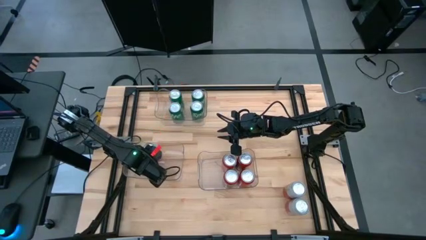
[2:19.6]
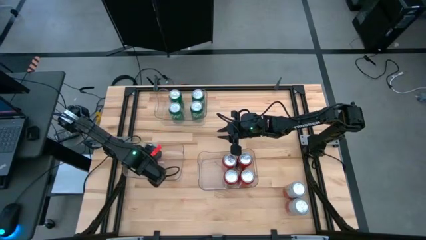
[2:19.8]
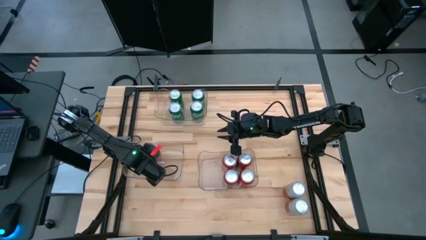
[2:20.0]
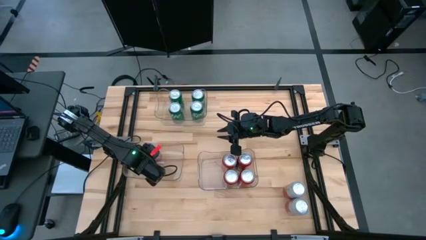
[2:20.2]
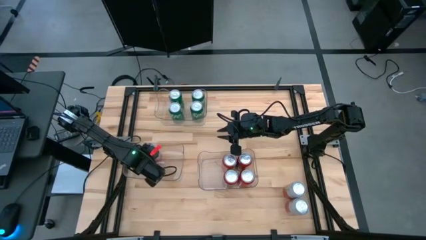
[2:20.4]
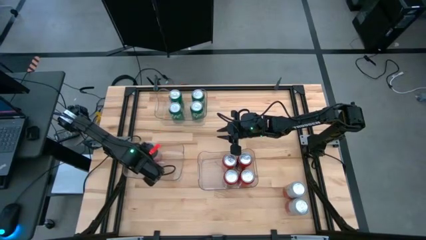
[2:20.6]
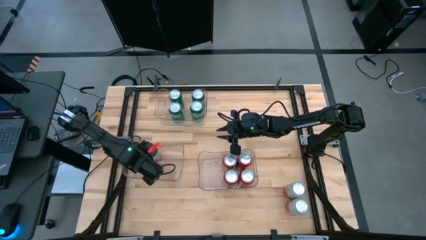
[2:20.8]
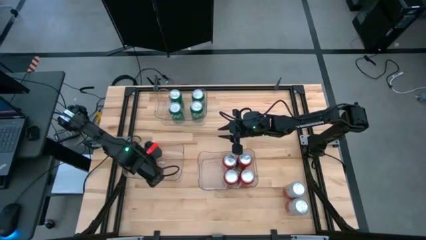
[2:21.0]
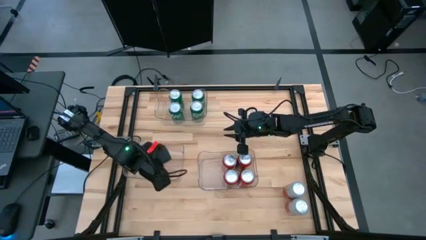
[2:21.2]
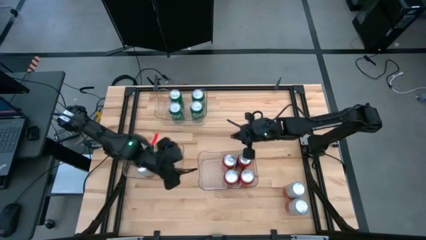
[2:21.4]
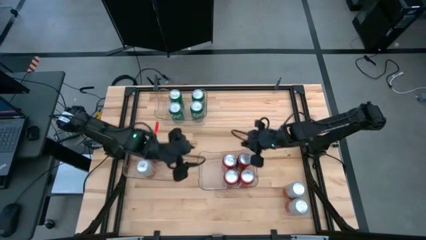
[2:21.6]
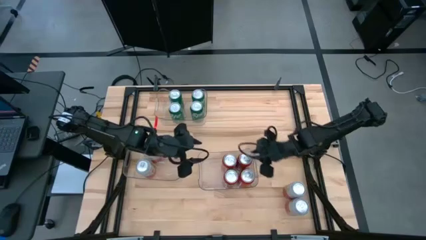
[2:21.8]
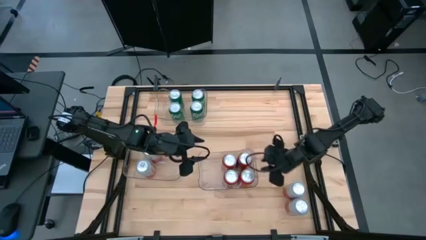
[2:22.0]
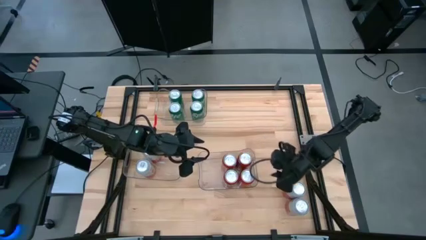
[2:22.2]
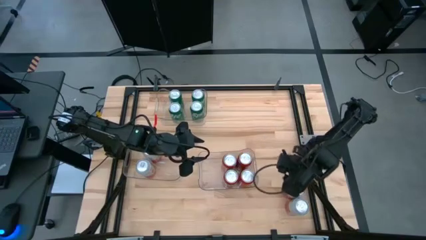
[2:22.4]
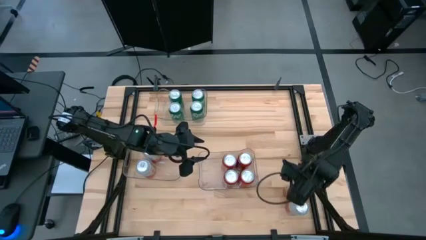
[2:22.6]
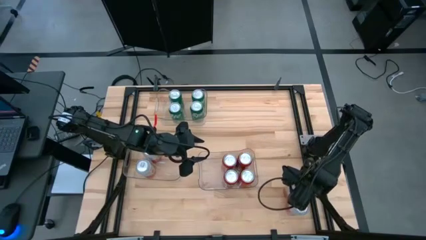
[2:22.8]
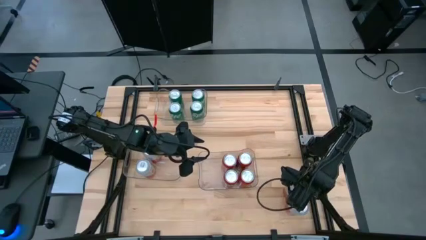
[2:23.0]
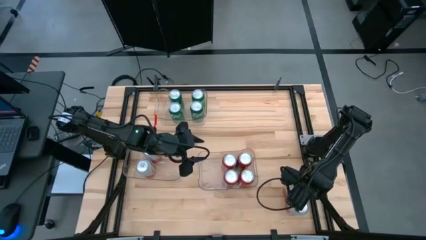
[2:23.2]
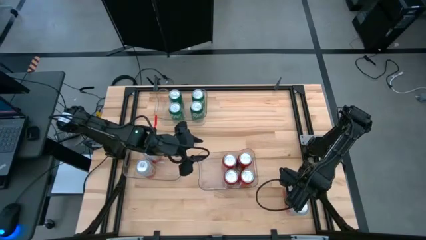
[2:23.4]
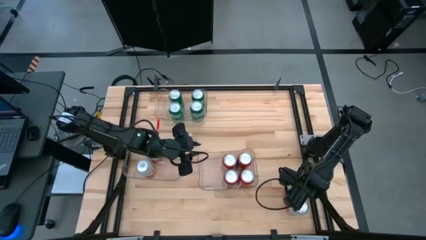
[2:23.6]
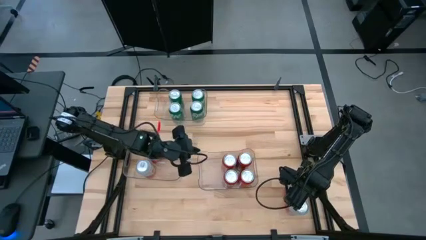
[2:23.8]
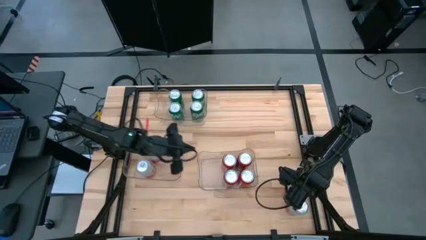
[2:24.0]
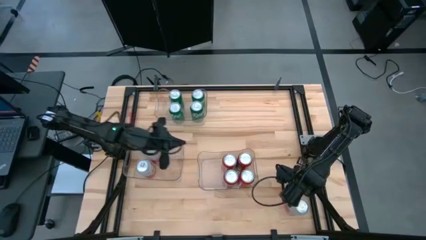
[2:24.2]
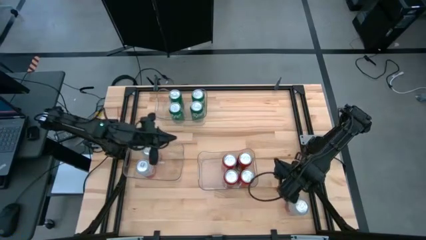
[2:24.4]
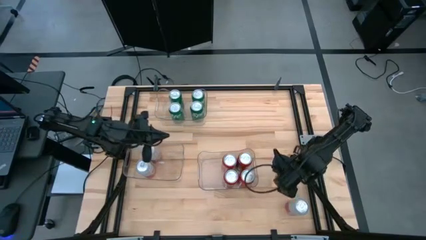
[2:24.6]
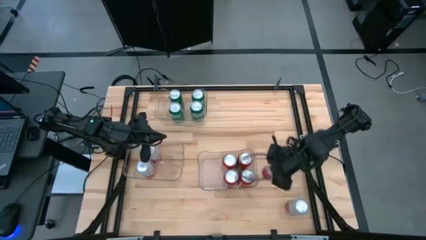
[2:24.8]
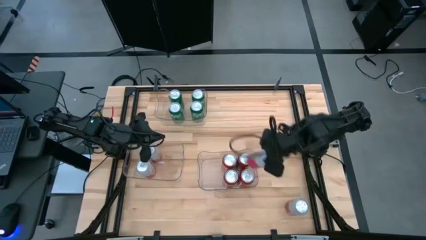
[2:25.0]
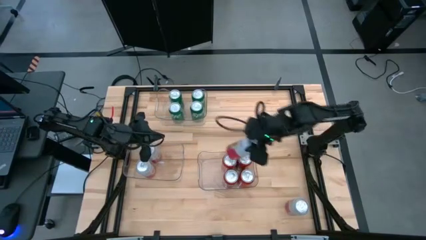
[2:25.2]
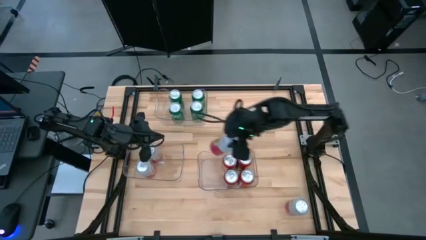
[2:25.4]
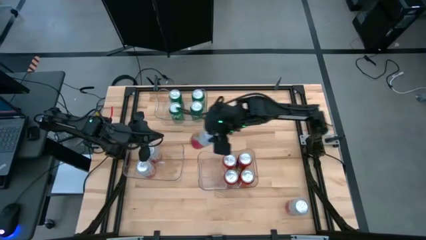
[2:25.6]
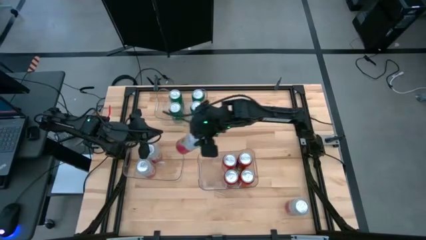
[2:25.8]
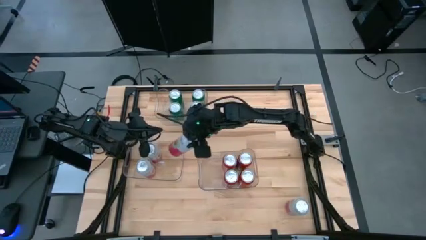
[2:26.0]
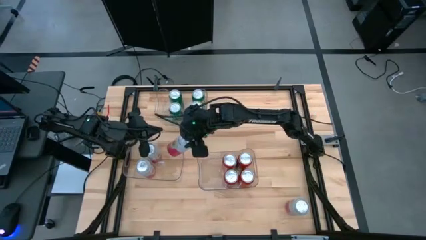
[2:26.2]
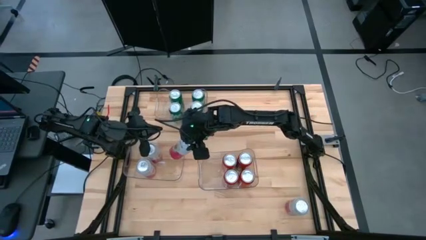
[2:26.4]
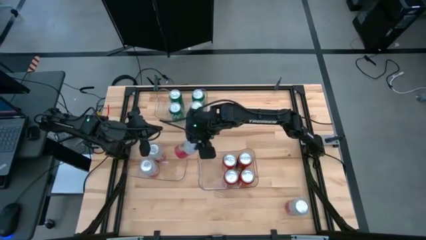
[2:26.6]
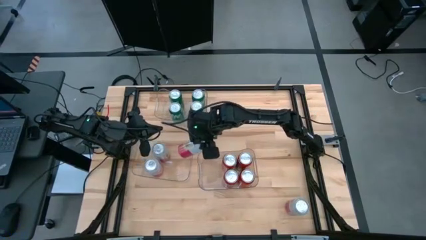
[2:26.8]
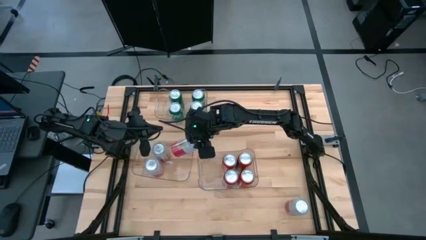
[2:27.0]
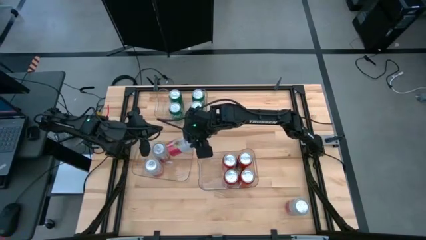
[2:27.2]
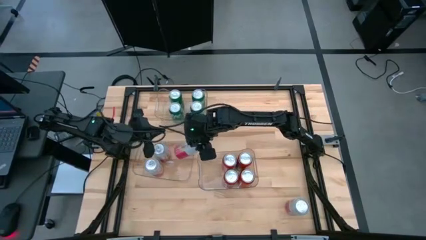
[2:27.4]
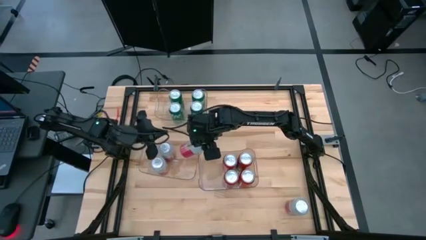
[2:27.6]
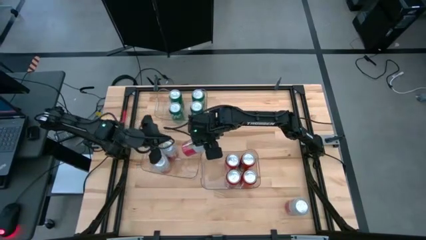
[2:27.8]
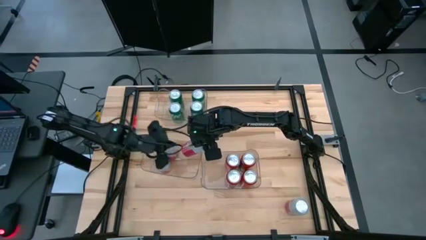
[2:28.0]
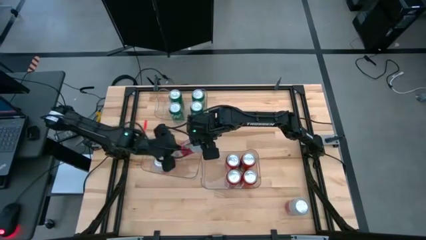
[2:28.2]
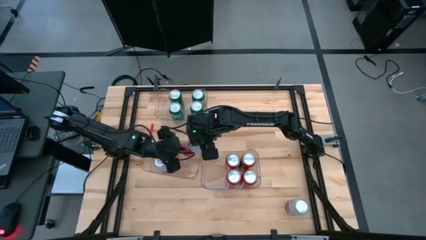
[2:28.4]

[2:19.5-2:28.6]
Task: Sort soda cans
Put the pink white soda can into the bottom left transparent bin

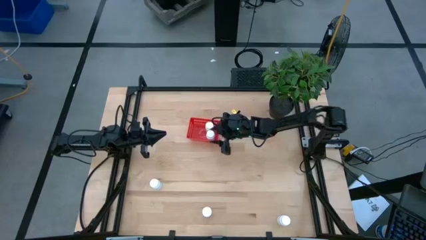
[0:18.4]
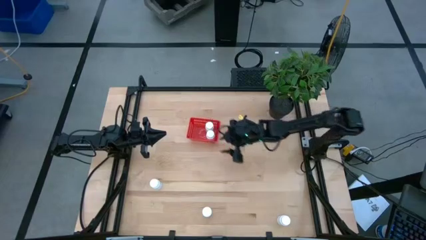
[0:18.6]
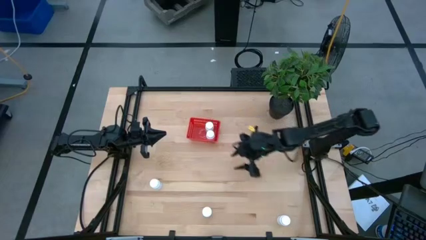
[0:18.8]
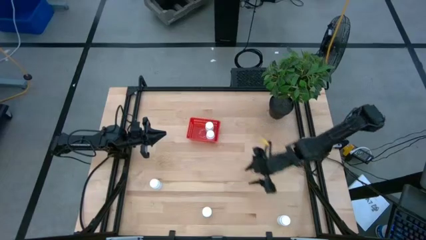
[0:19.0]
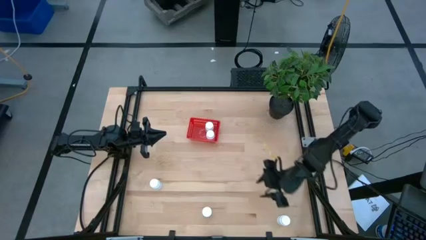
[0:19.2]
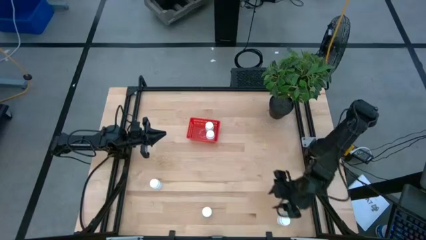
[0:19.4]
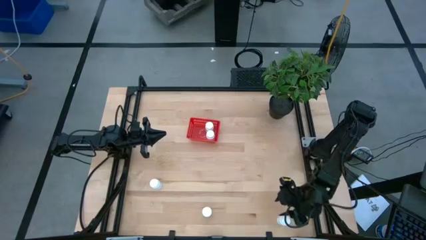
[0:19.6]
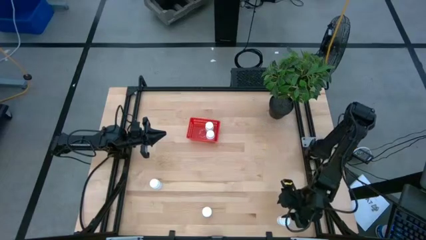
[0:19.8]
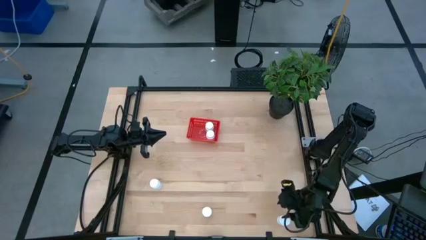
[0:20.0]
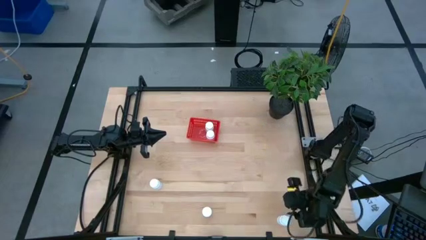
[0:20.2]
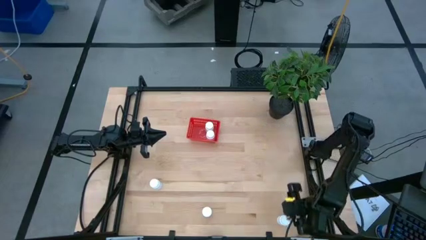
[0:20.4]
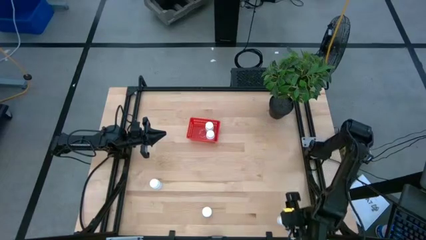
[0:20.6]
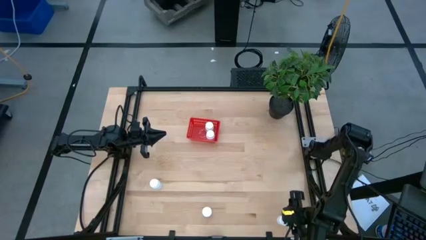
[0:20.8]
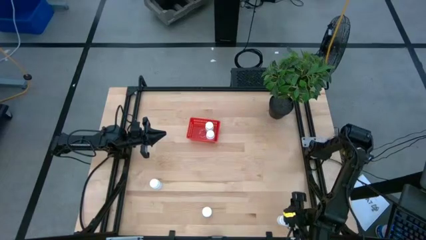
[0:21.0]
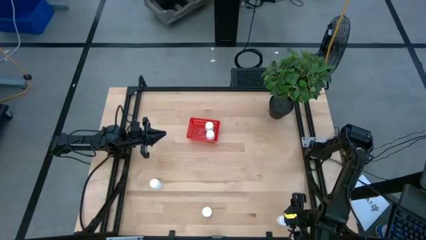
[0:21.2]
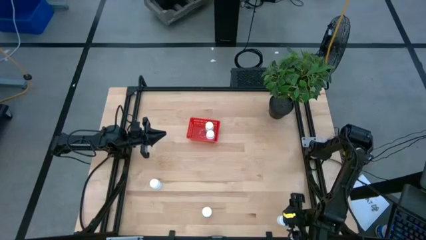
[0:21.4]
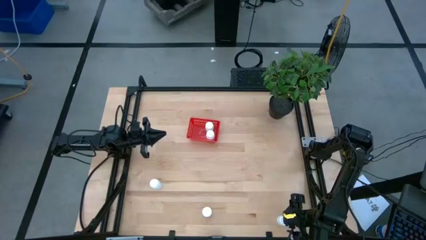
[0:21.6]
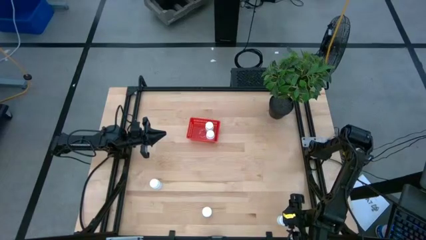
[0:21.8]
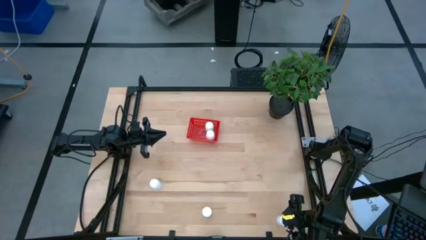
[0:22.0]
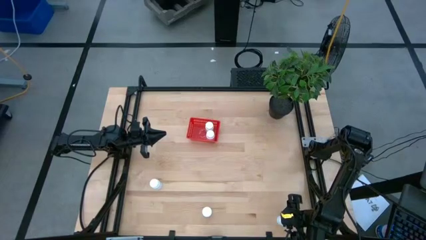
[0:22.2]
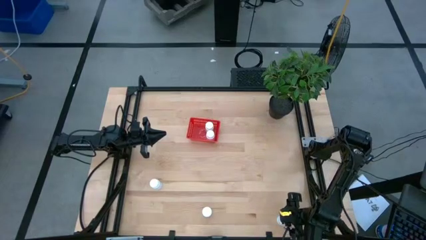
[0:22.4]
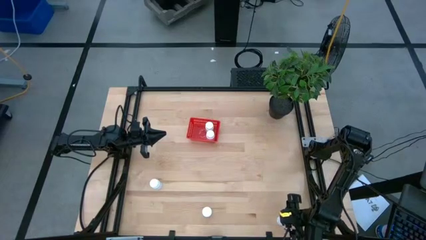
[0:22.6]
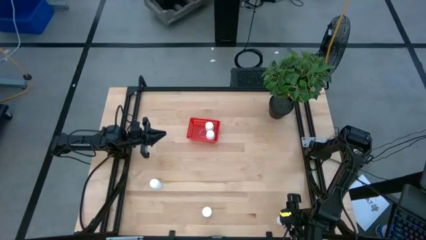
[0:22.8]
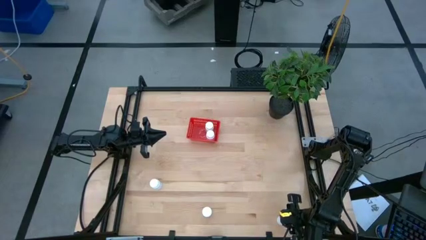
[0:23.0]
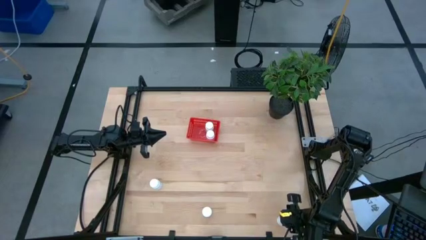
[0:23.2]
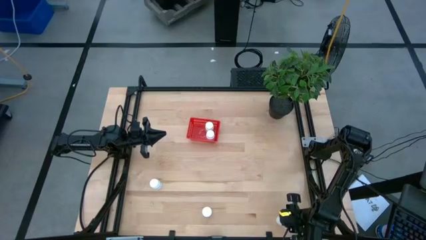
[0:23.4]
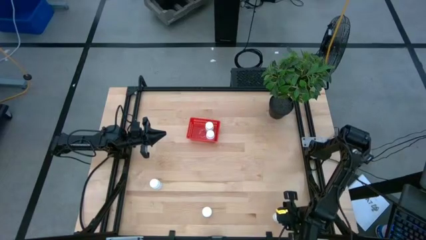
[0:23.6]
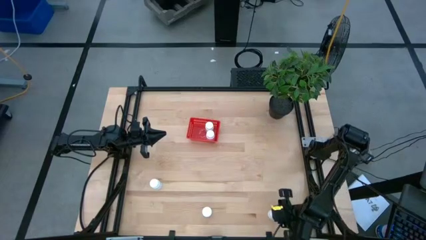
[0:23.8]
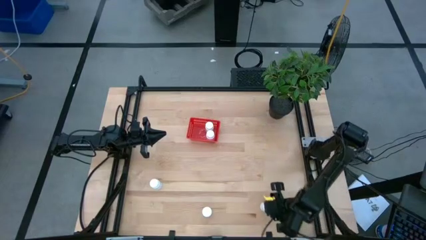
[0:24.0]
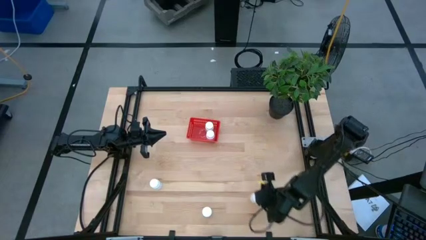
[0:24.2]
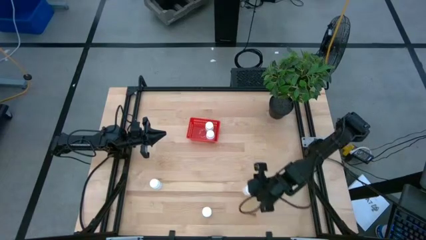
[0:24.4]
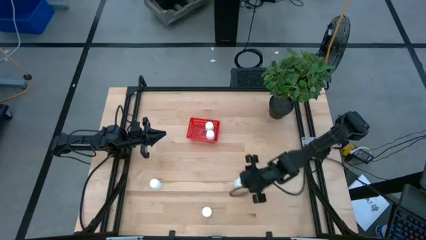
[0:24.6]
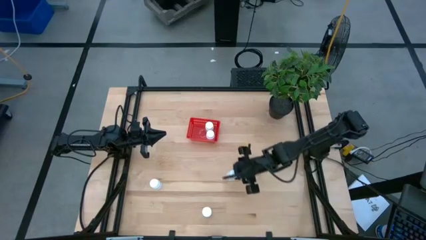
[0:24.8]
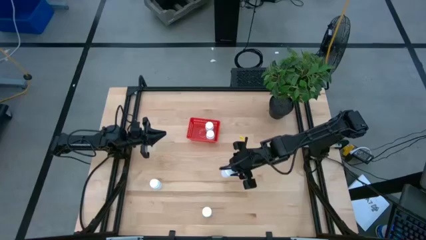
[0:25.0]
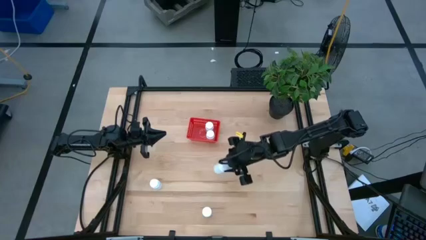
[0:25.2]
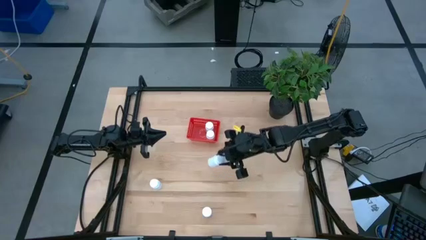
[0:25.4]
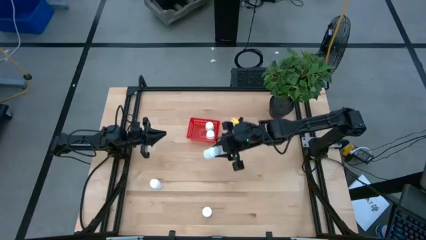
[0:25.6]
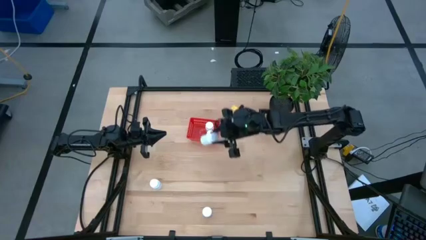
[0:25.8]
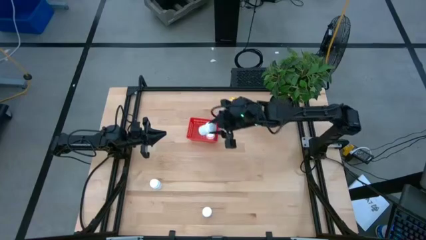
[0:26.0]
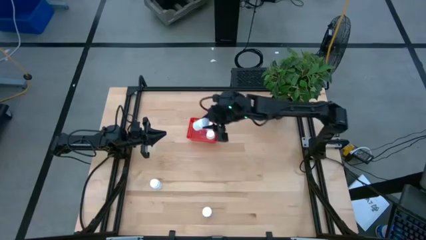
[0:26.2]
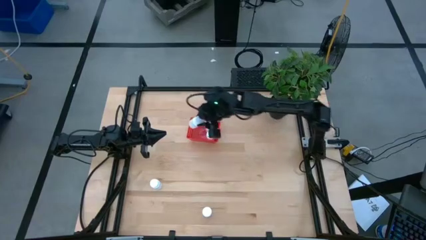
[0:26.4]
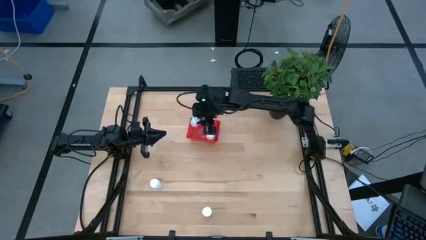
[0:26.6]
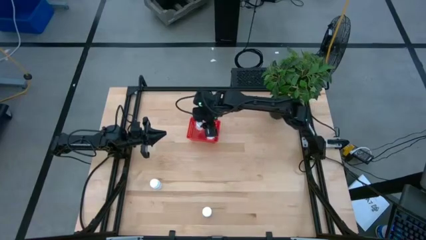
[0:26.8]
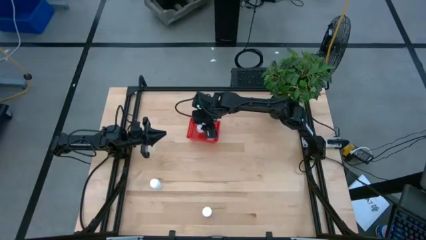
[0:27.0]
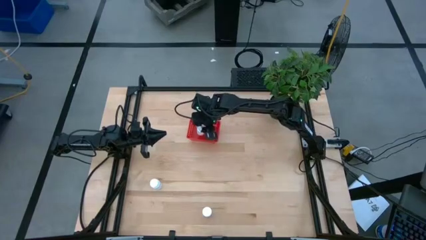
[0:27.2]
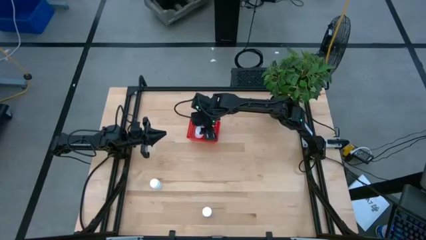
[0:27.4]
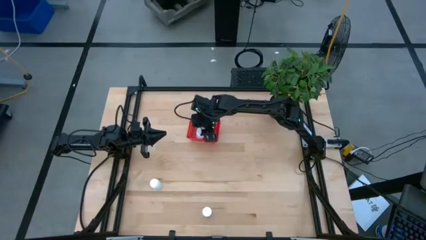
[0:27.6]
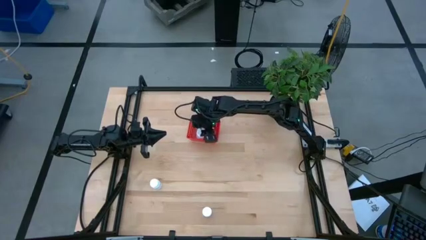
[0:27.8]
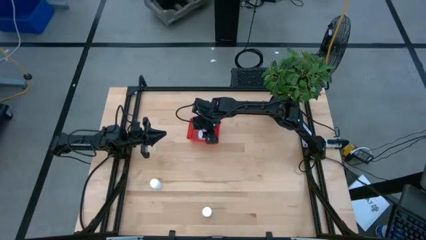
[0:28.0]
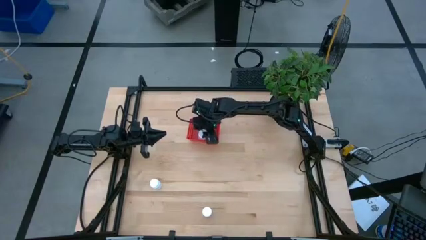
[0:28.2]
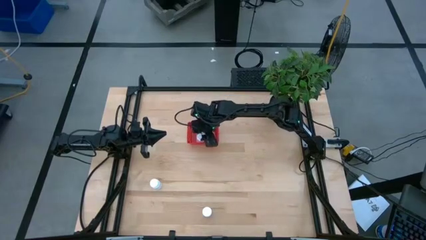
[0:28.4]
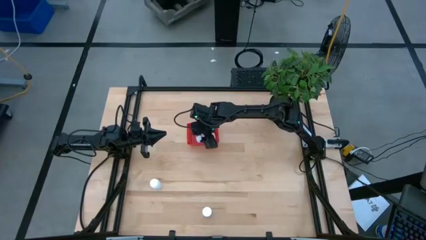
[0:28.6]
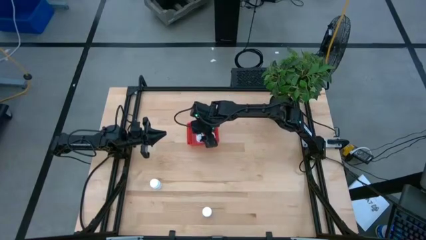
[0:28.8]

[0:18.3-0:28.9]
Task: Pick and place pill bottles into a basket
Put the white pill bottle into the red basket
